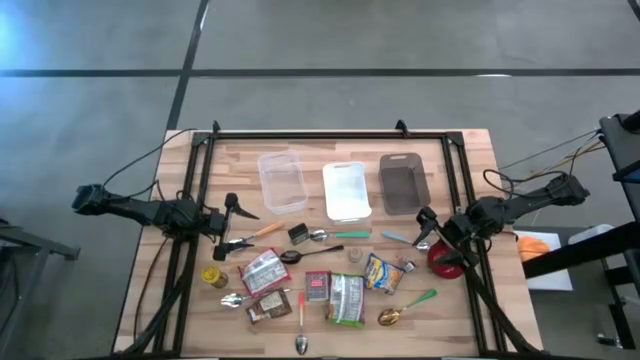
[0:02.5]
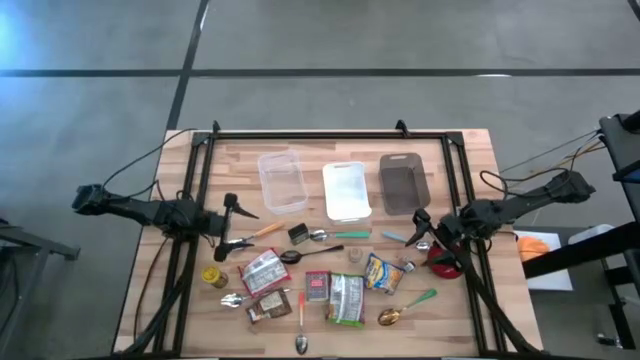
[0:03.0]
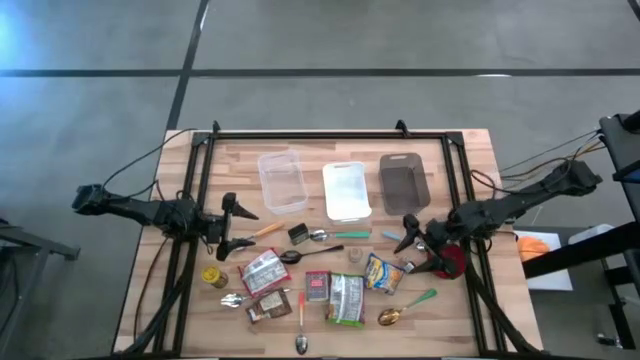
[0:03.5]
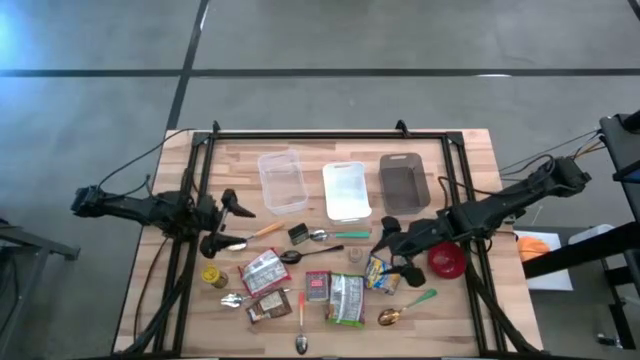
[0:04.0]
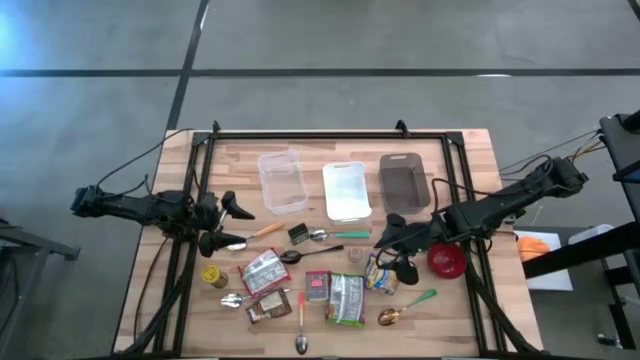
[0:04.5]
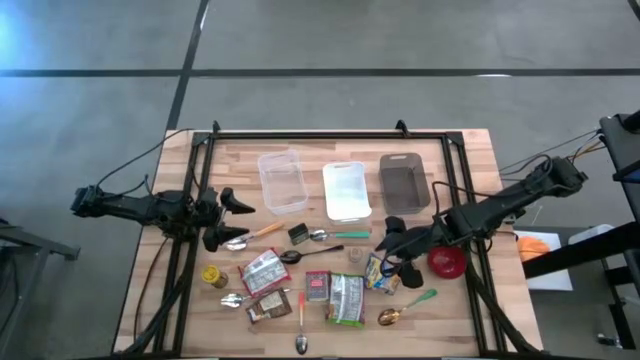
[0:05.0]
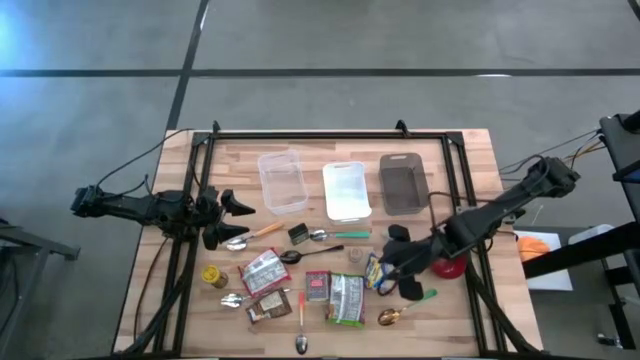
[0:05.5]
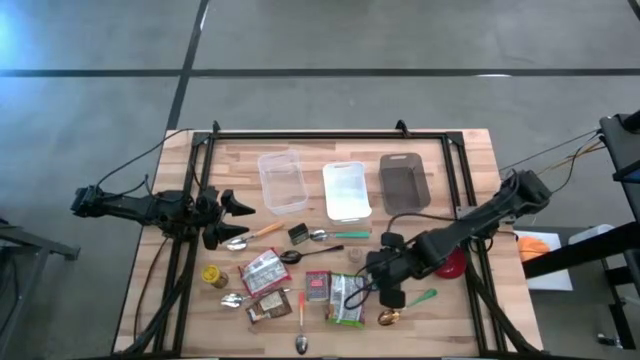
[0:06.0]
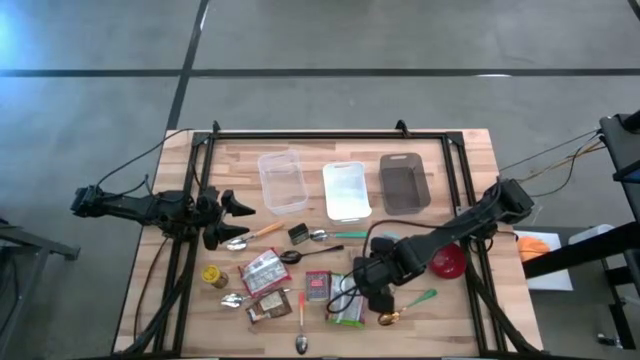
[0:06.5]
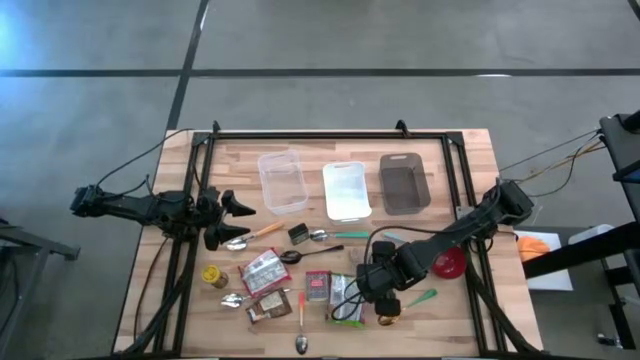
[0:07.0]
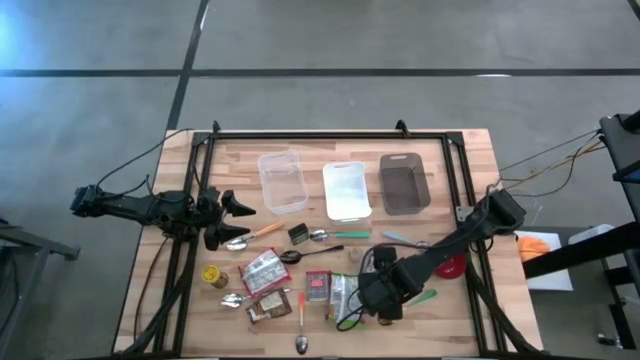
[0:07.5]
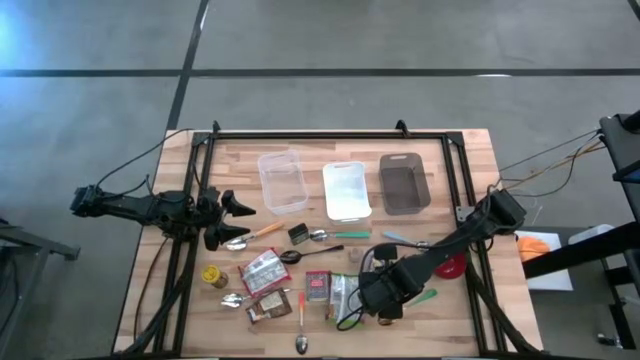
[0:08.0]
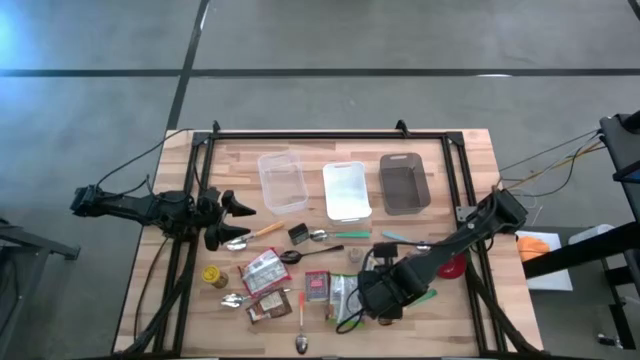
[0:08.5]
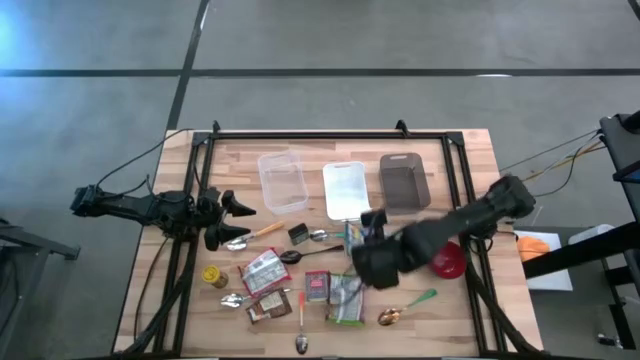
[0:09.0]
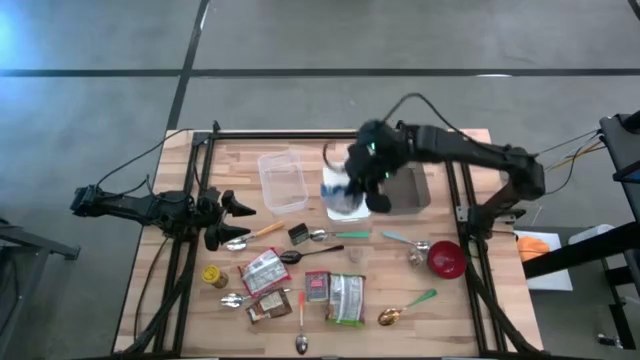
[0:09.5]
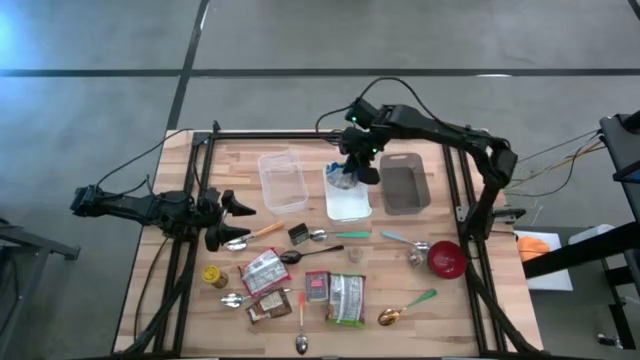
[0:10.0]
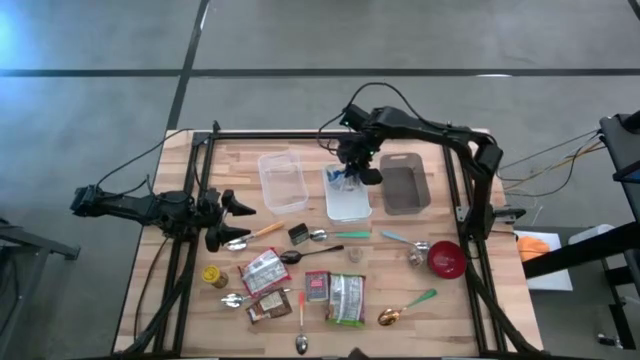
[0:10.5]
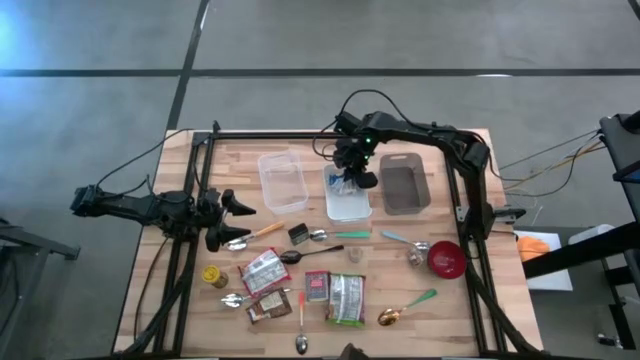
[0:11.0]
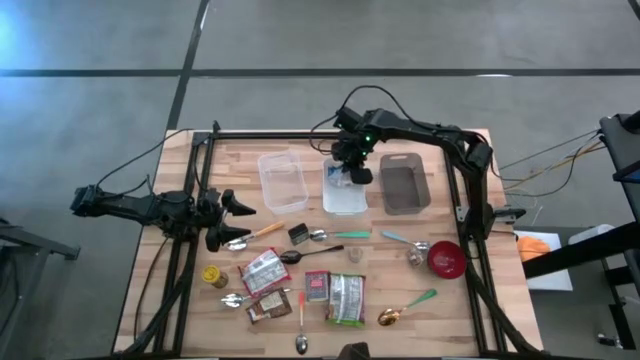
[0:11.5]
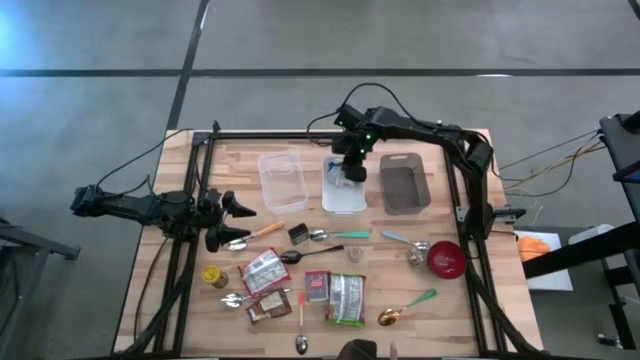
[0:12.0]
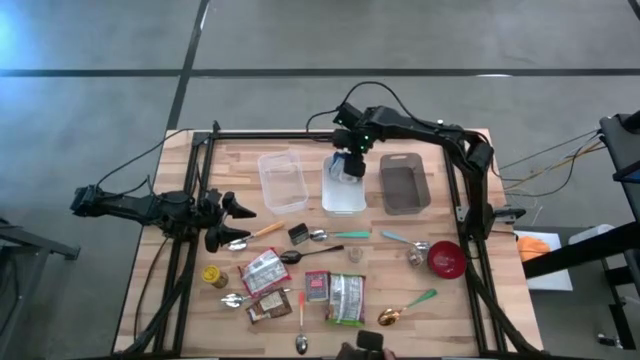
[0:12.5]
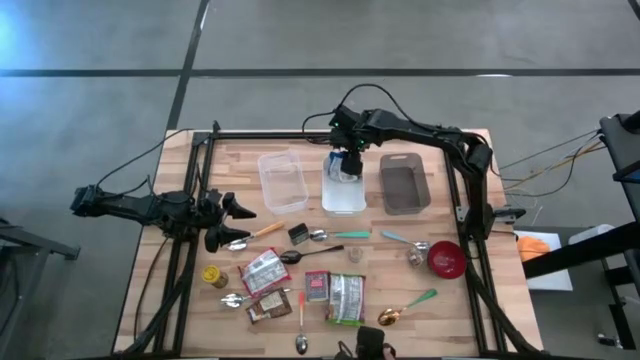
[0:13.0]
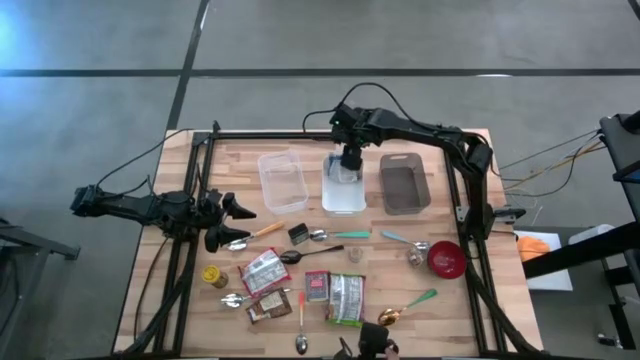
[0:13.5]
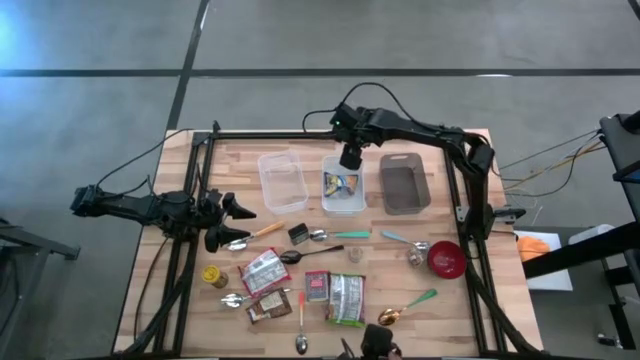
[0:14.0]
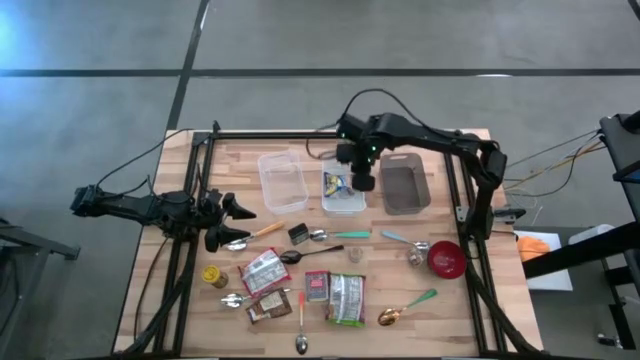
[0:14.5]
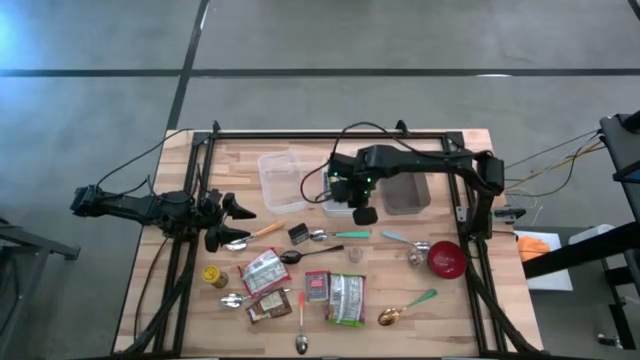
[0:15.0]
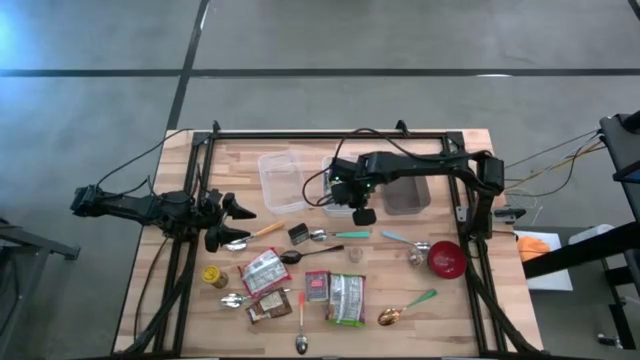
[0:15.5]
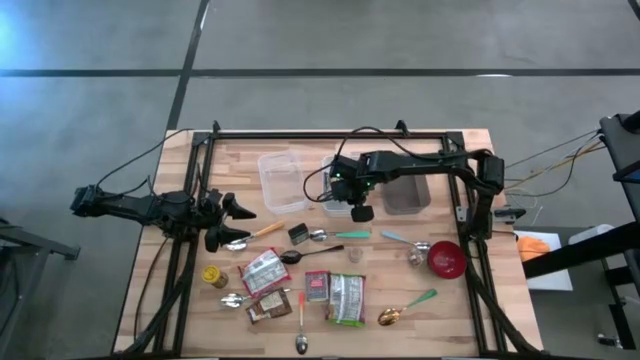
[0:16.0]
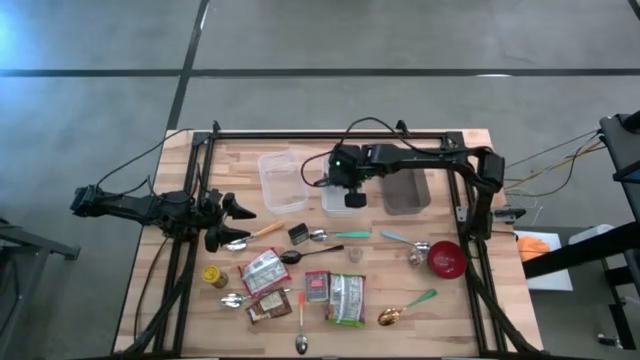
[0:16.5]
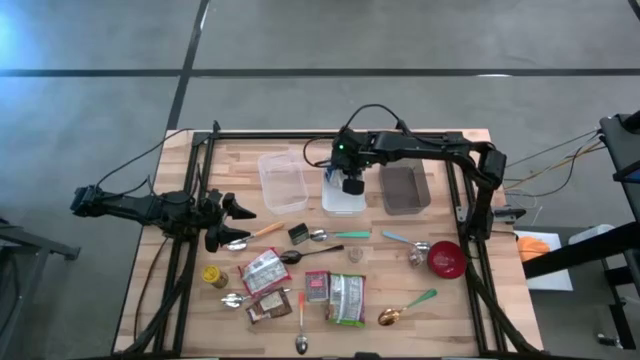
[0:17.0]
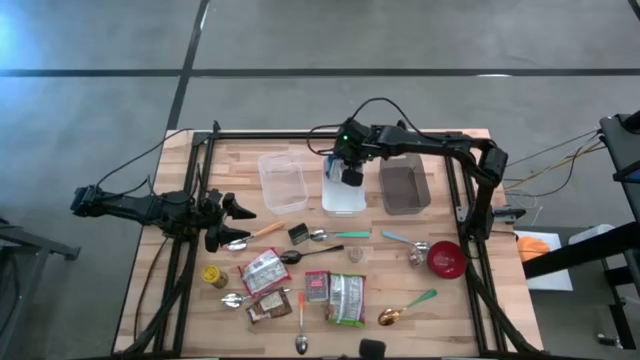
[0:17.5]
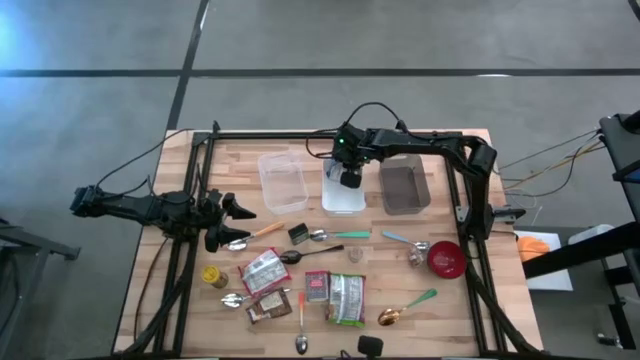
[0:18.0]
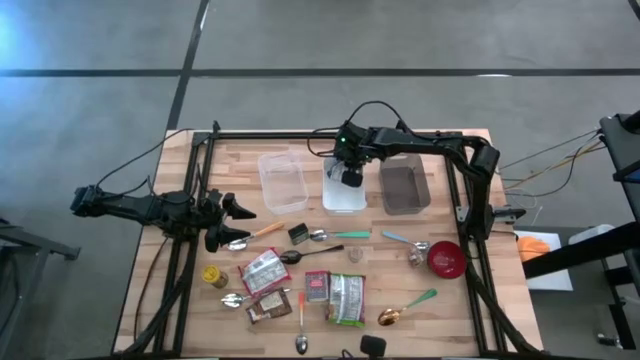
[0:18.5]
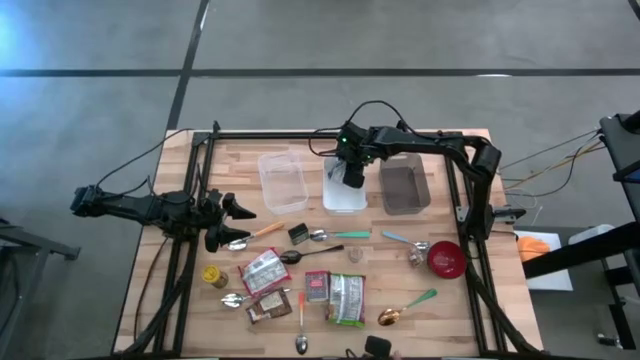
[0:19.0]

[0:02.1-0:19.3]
Put the blue noodle pack into the white bin
